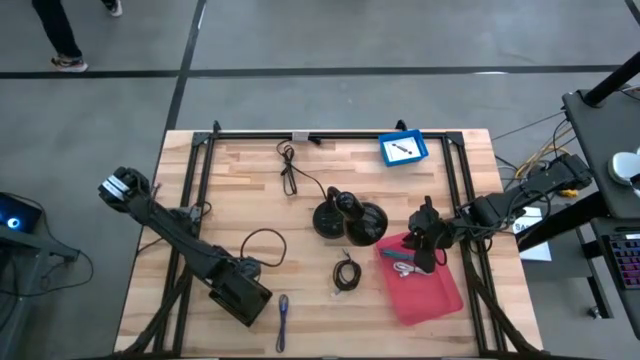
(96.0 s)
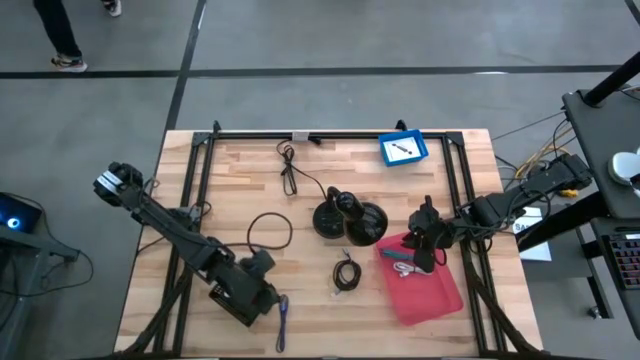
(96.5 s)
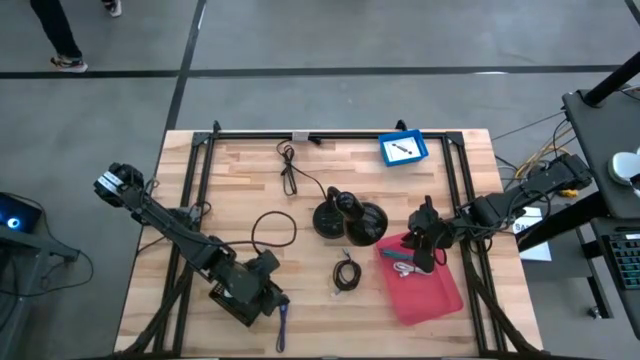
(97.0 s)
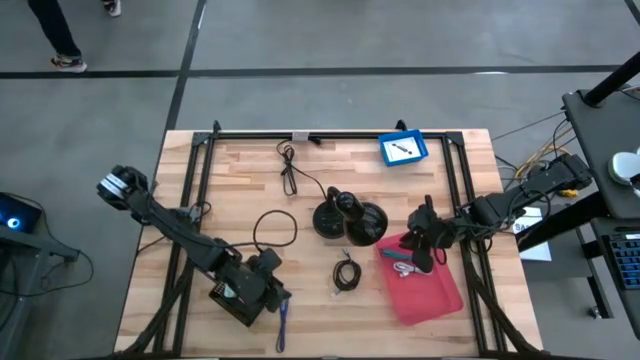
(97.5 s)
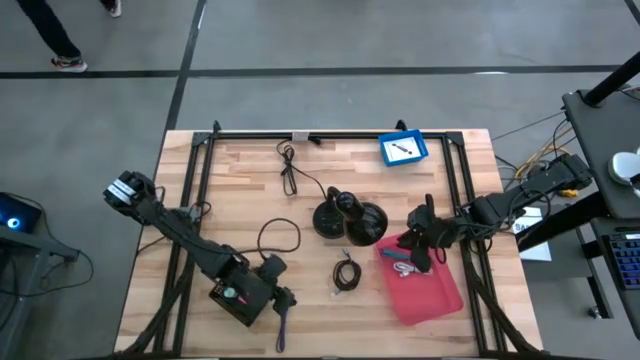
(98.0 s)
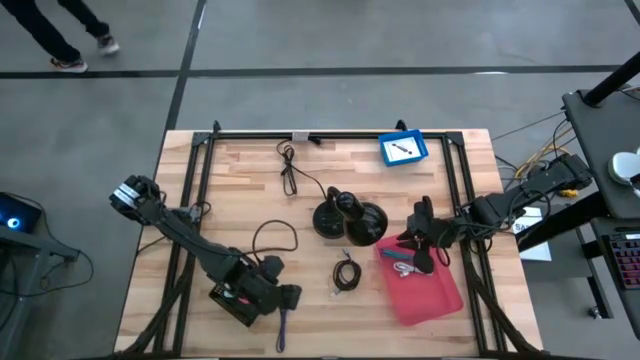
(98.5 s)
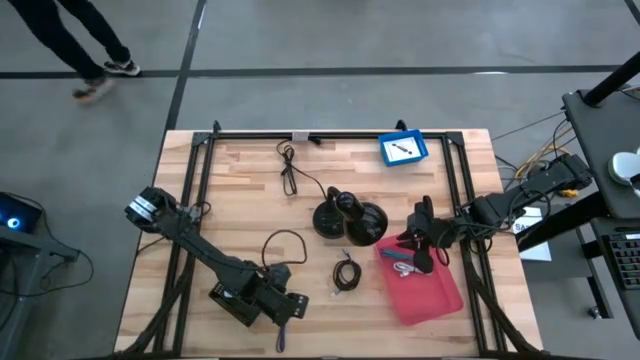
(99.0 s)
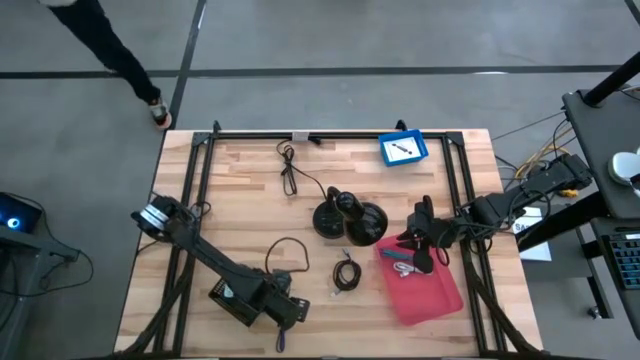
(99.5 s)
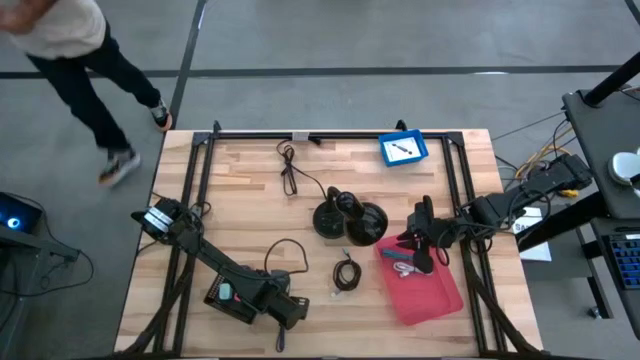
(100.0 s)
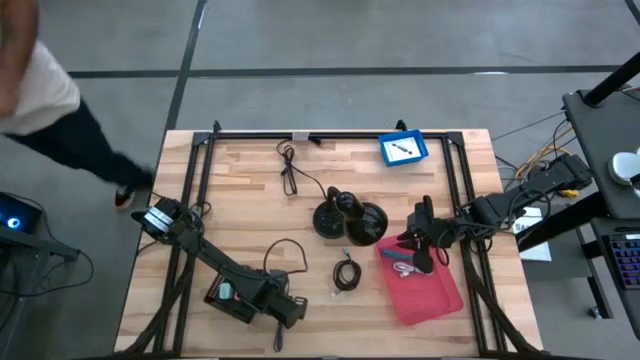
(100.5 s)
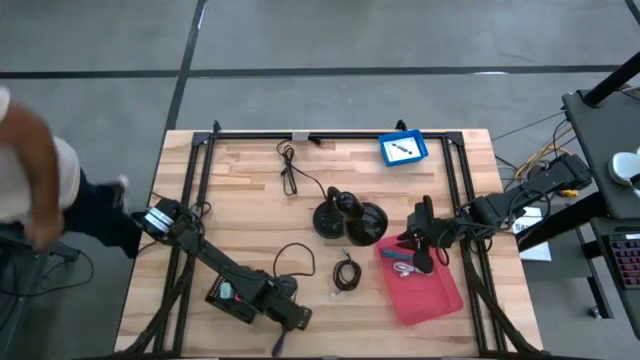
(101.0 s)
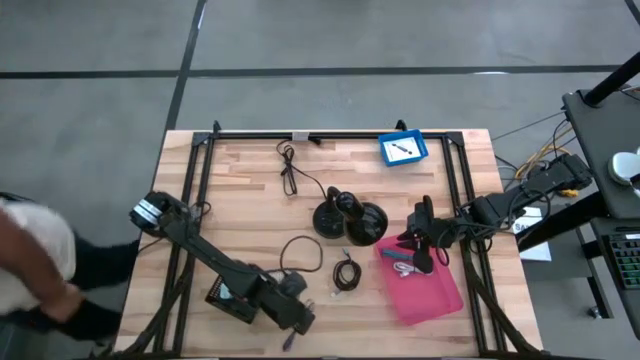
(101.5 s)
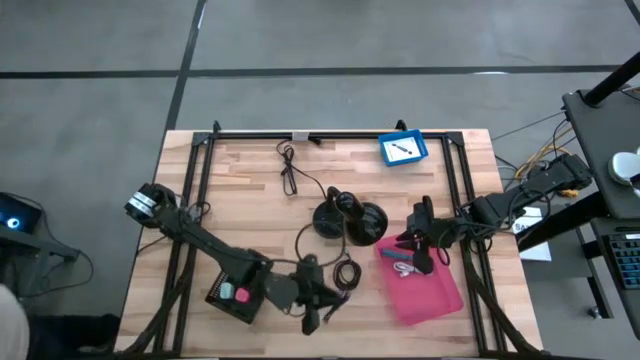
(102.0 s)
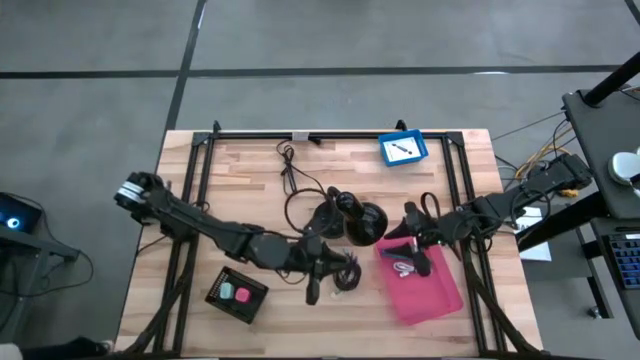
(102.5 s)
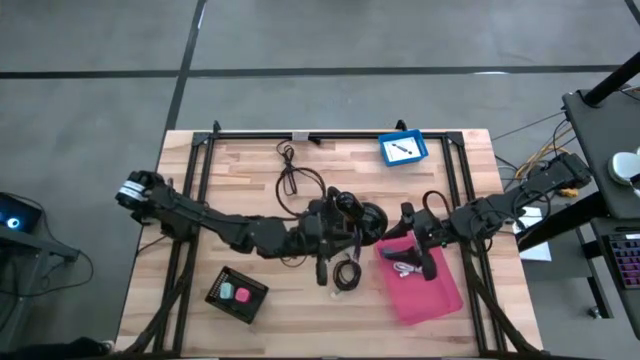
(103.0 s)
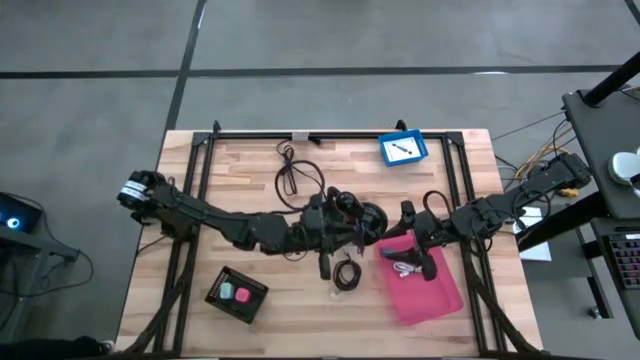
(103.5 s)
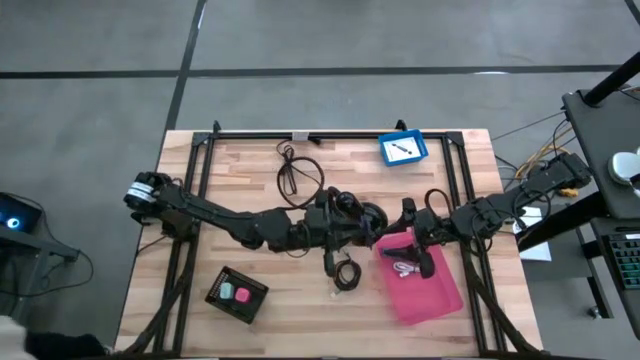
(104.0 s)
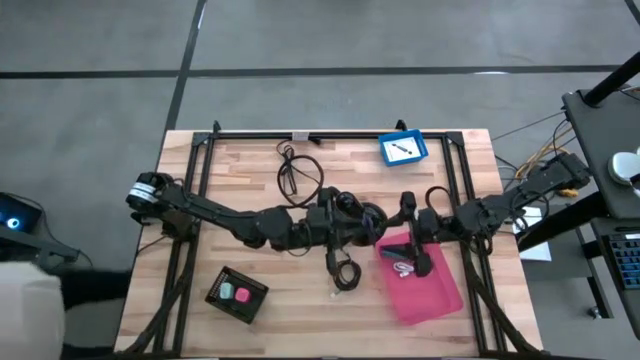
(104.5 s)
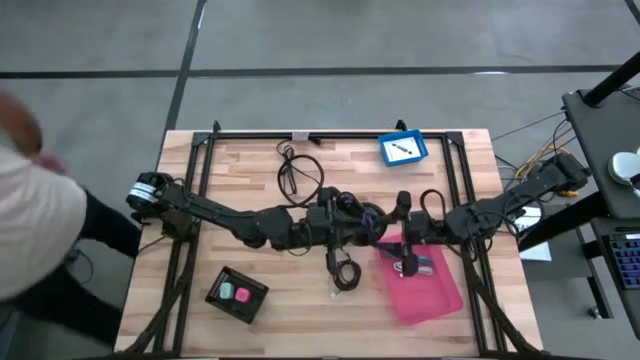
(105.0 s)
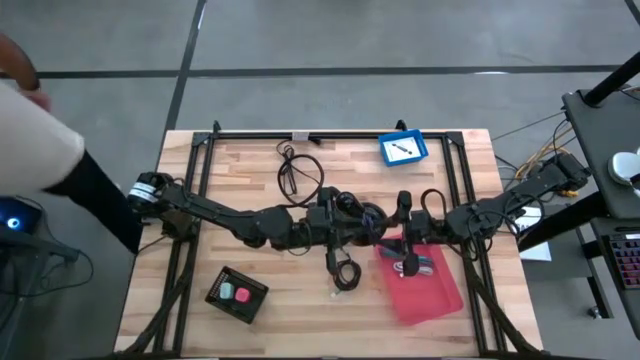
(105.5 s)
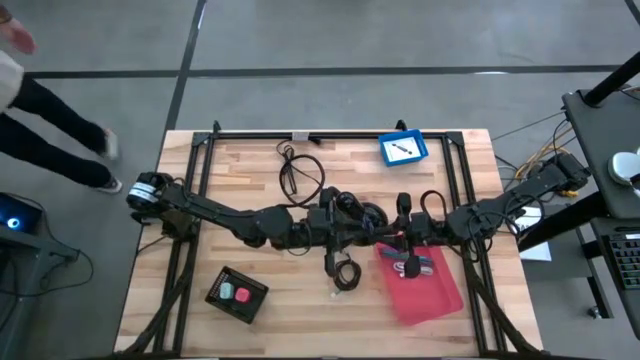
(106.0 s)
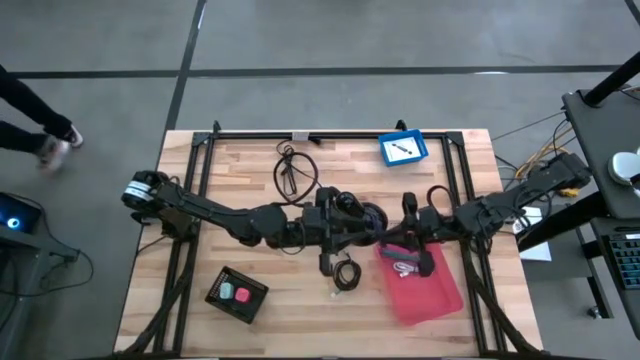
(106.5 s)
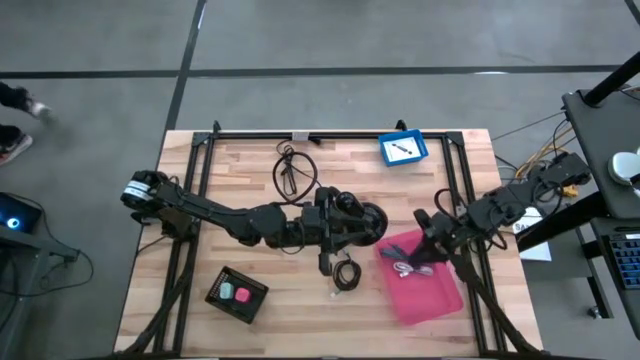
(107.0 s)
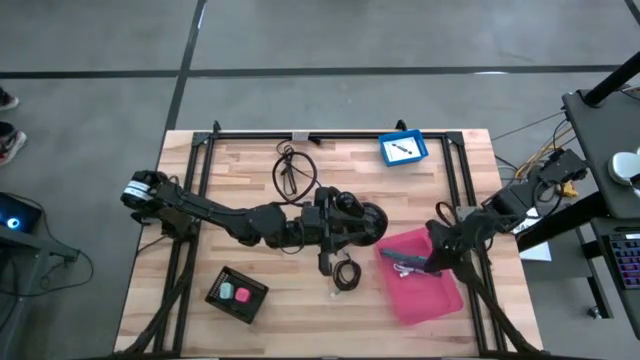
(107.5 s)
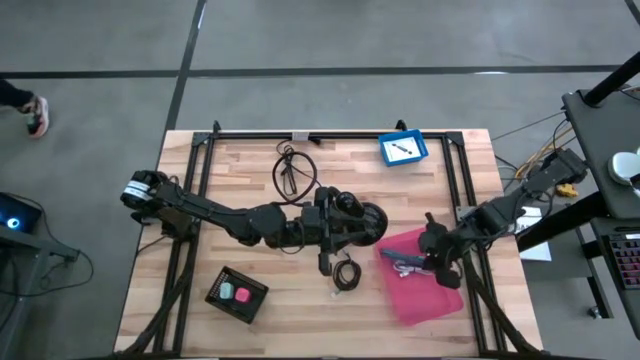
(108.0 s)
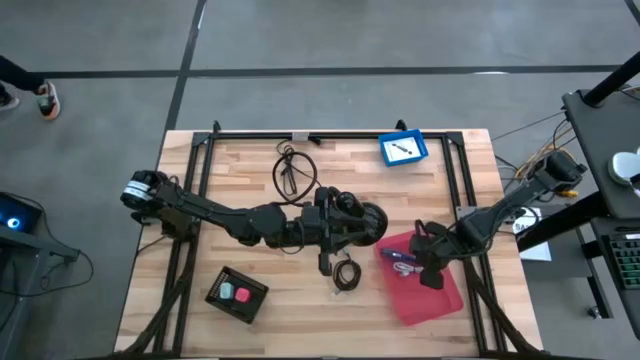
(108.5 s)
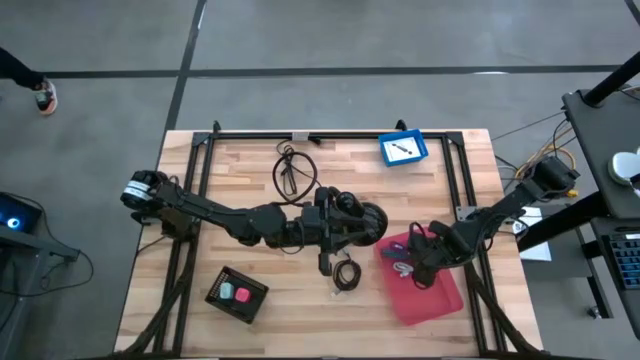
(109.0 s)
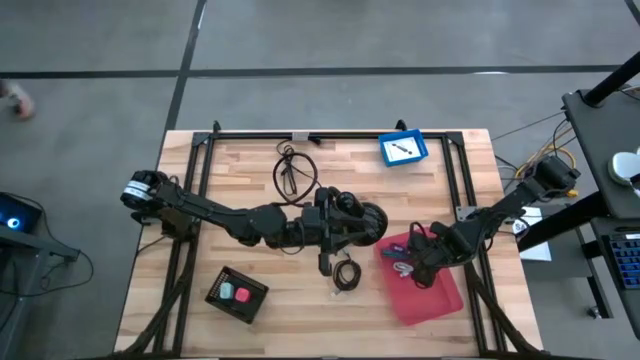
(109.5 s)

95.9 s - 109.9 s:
Task: Pick and place items into bin
Put the purple charger cable into the pink bin

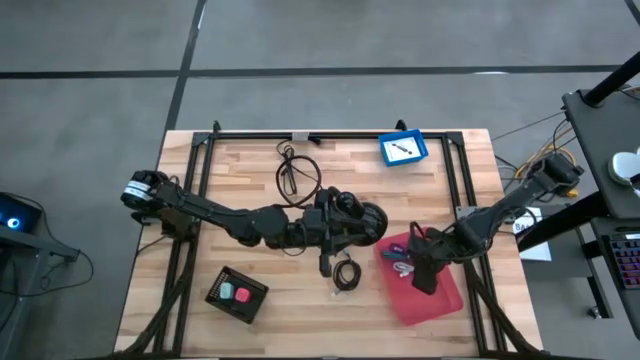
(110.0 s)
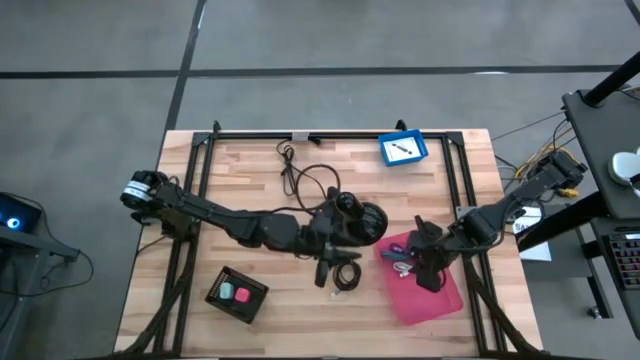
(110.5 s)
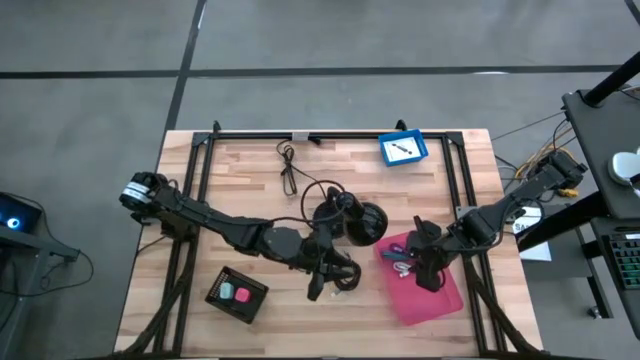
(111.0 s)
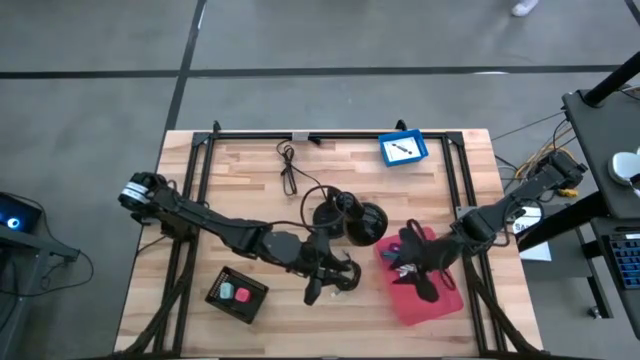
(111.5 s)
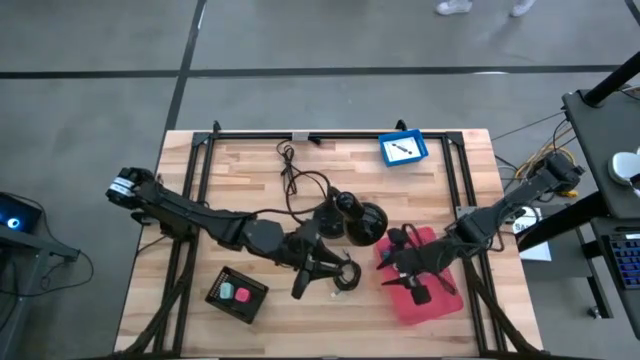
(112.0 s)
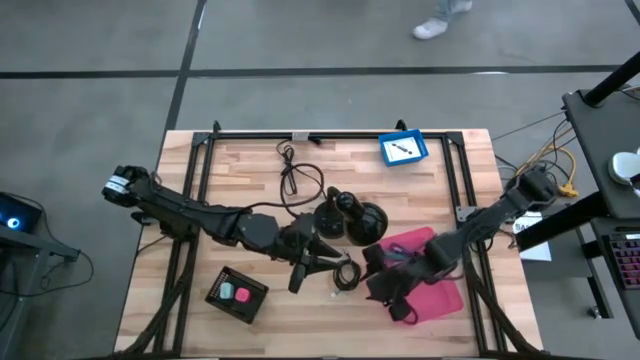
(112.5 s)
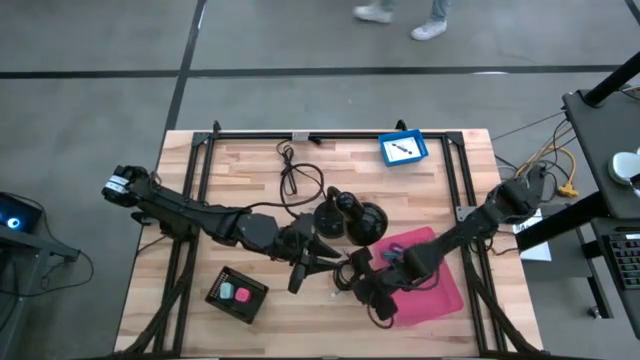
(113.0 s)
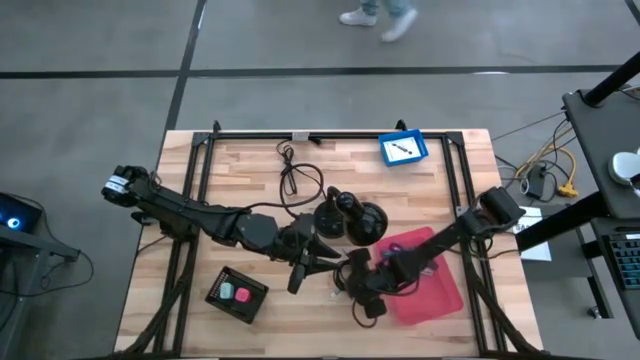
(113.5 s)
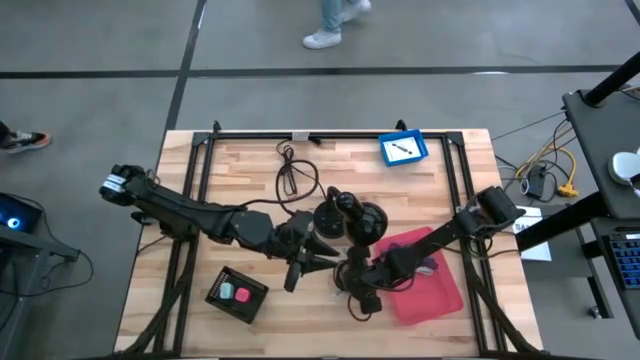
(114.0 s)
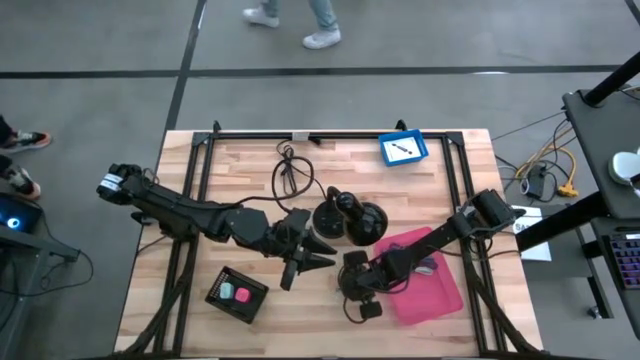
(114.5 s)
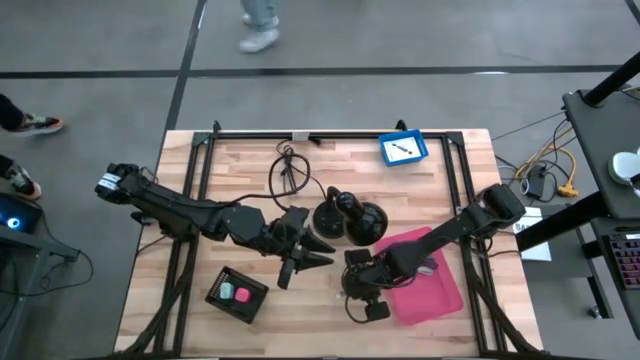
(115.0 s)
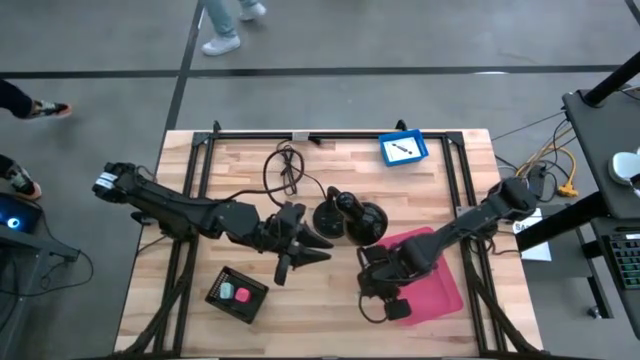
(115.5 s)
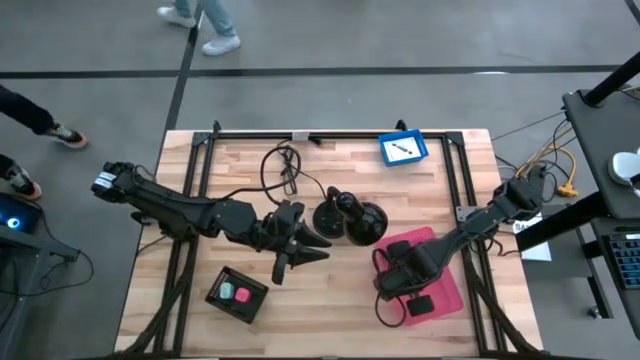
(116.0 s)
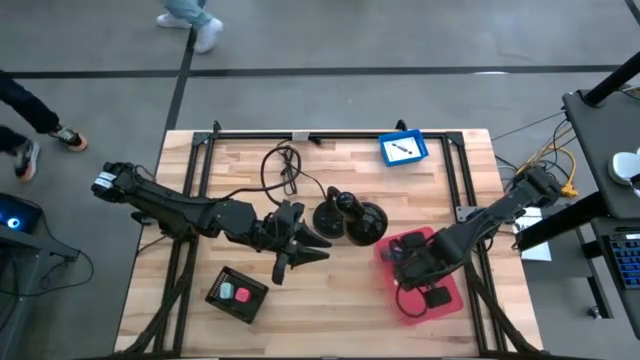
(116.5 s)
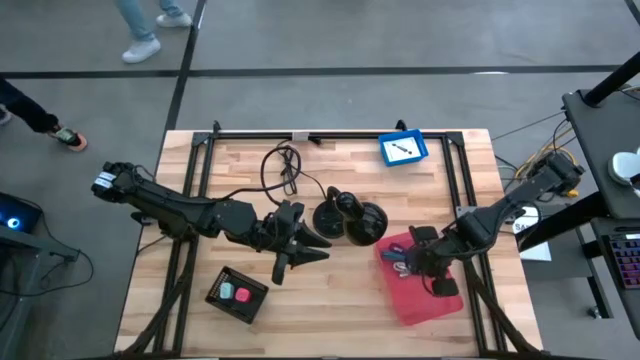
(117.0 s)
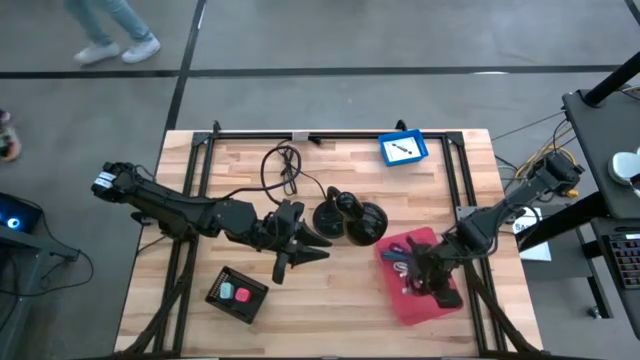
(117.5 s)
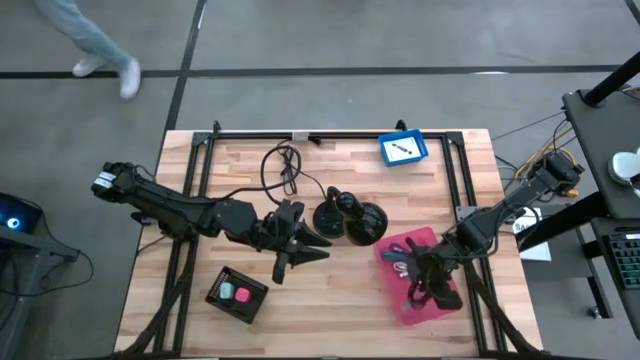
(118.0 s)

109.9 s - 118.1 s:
Put the black charger cable into the pink bin
